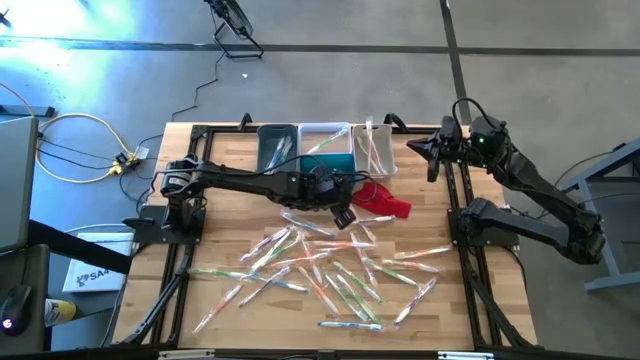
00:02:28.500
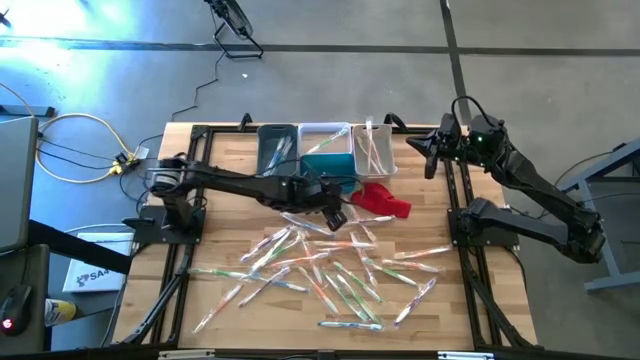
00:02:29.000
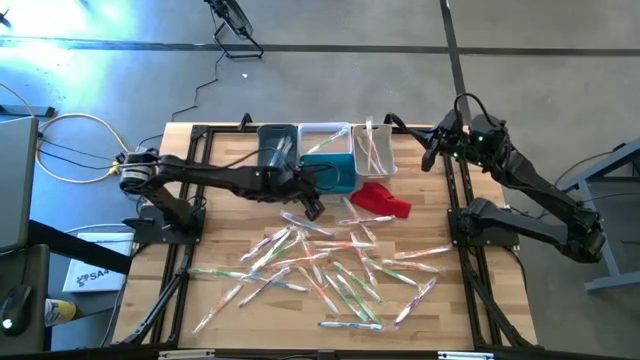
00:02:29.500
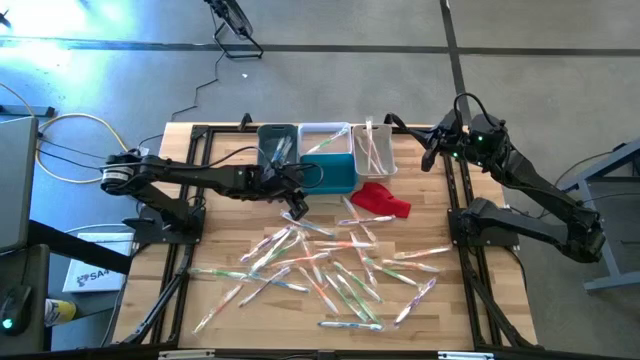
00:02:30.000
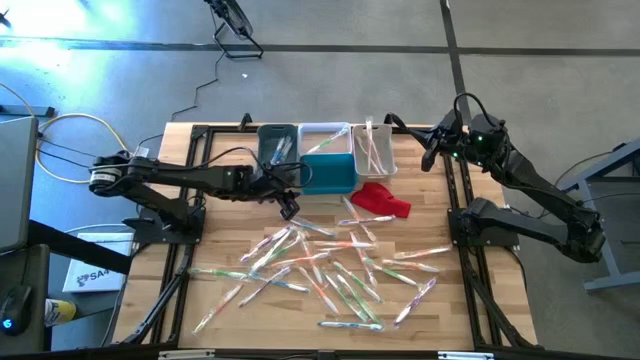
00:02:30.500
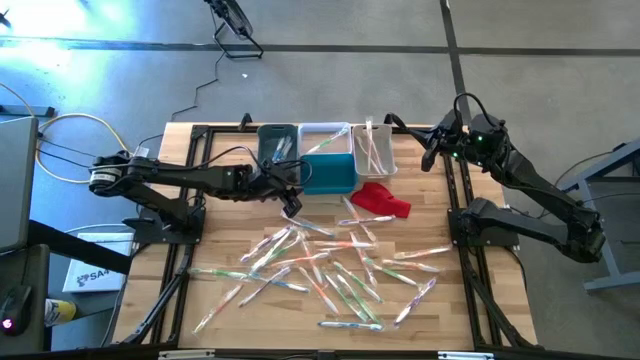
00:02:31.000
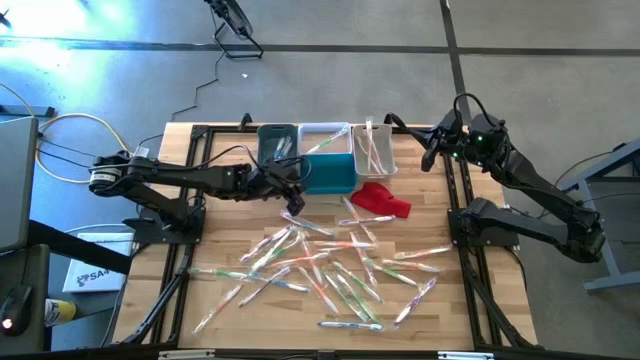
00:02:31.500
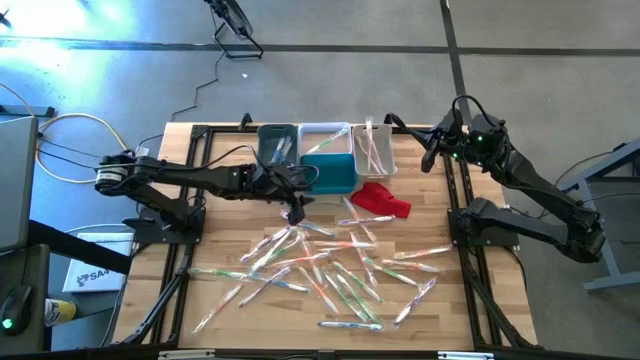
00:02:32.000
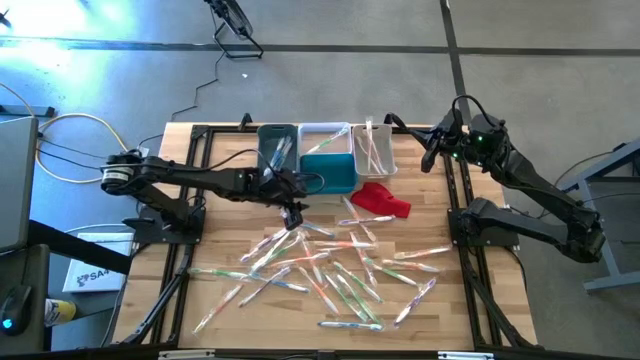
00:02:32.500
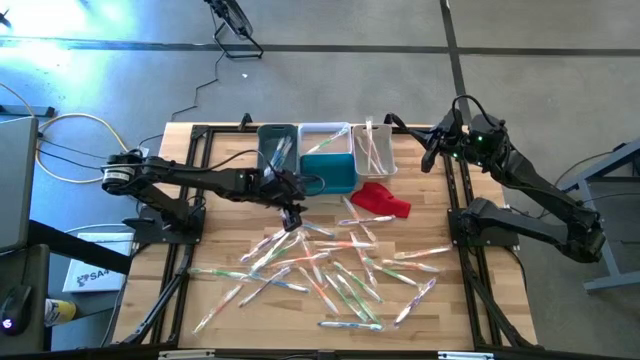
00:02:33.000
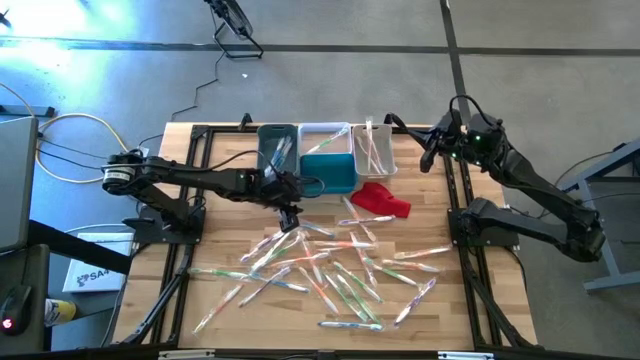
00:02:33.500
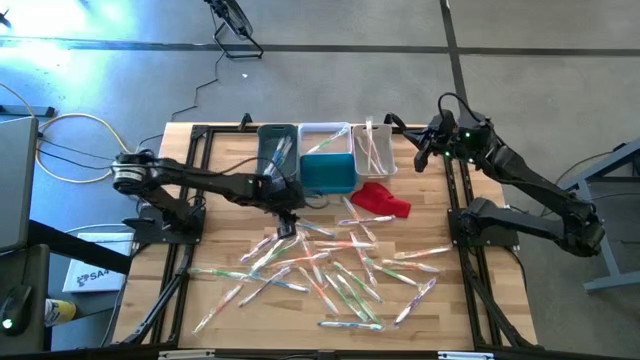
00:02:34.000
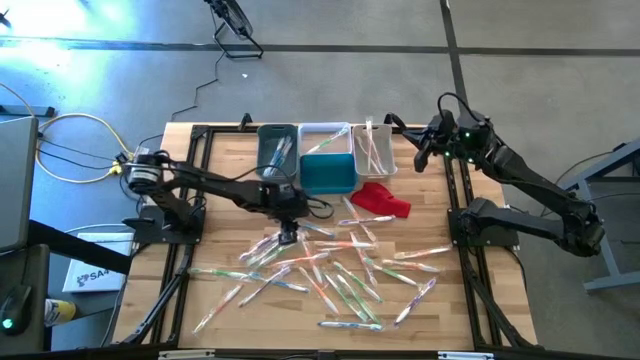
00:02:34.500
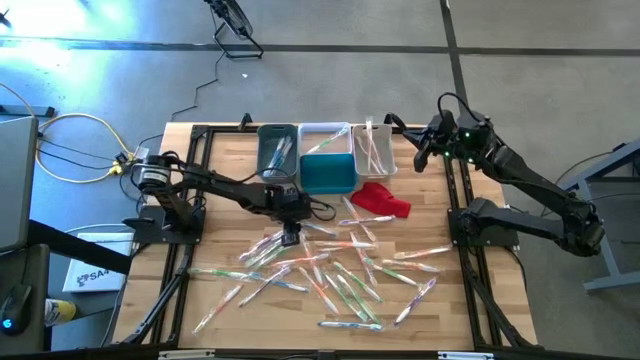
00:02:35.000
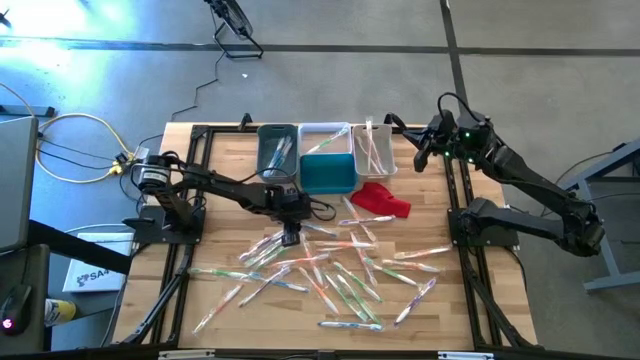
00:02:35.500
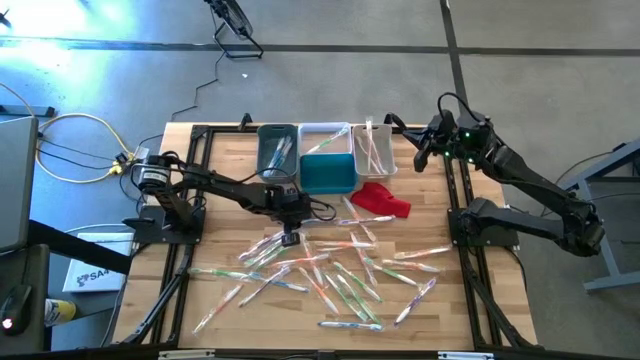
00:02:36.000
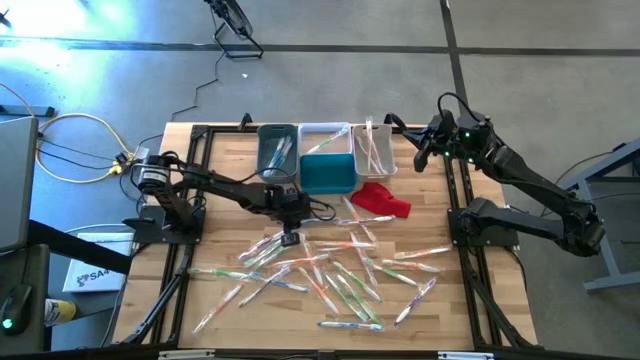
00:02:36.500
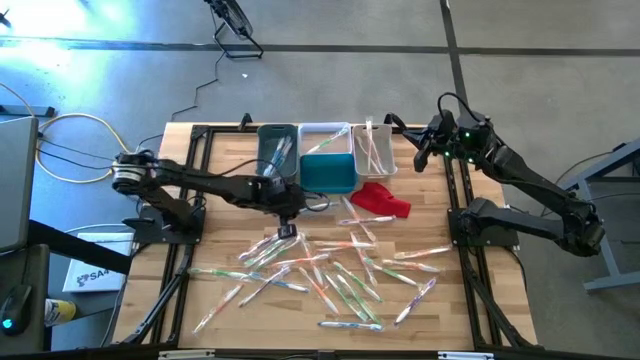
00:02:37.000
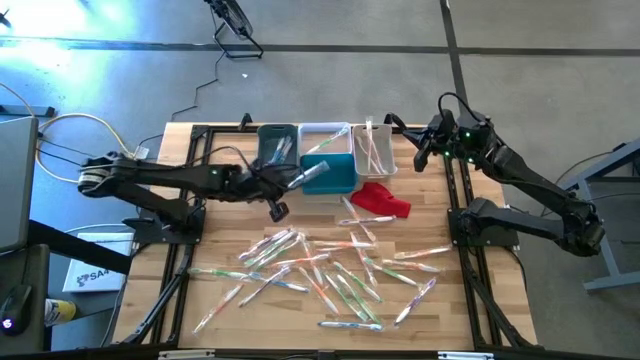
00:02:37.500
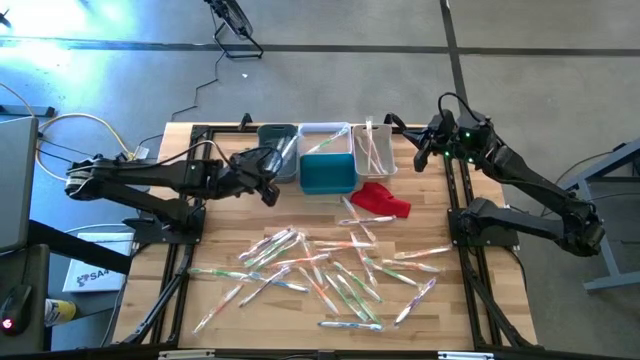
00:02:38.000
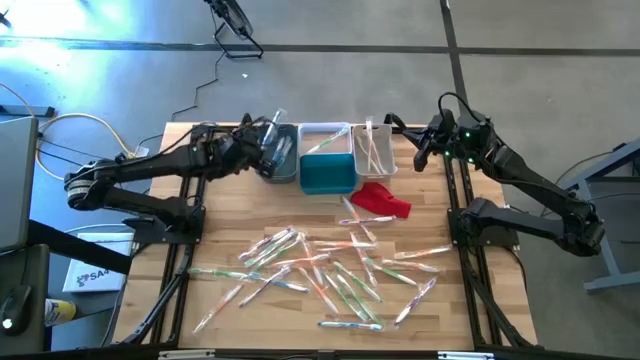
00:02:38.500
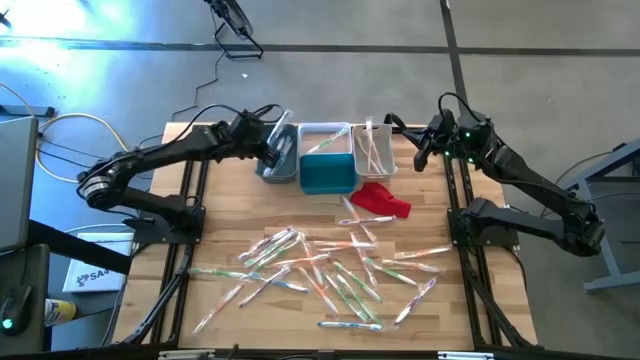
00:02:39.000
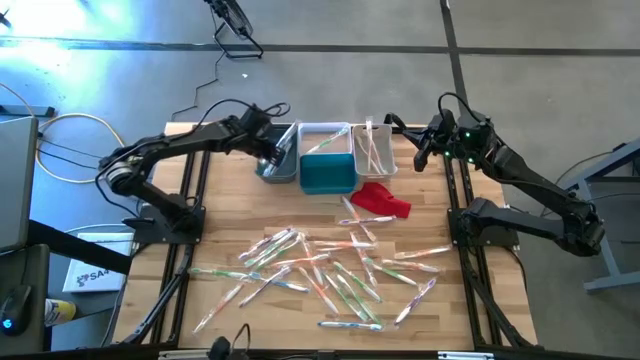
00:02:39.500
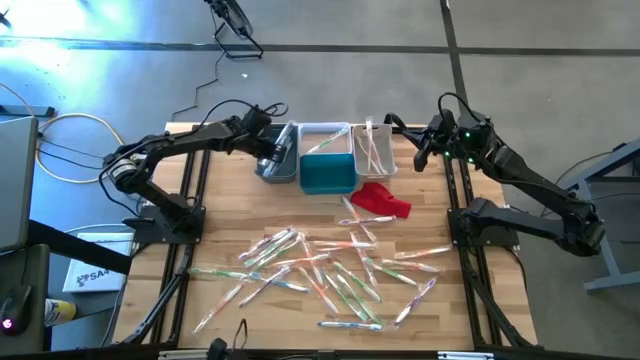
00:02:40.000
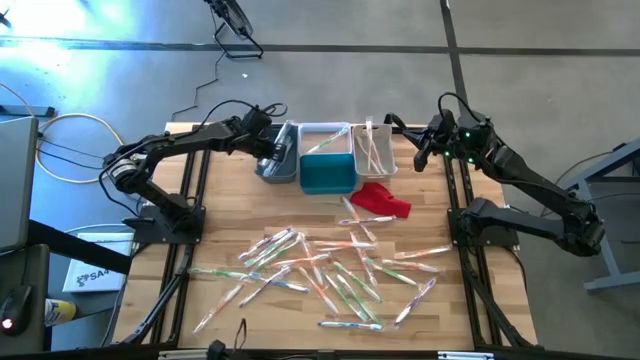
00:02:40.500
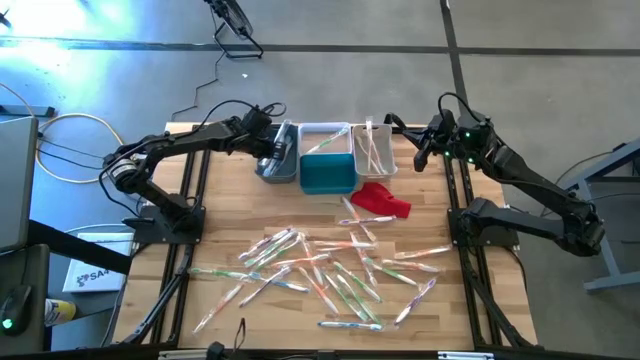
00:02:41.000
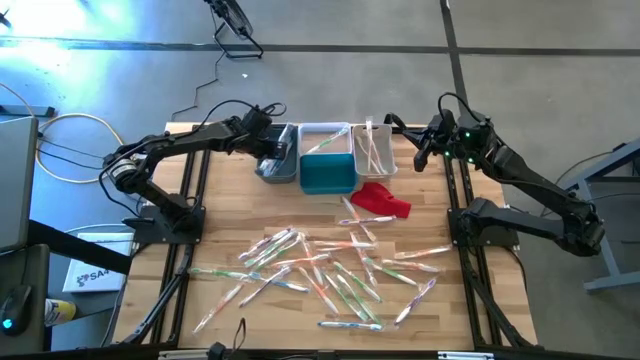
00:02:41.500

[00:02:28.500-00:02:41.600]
Task: Pick & Place Toothbrushes
Put the top blue toothbrush into the gray bin

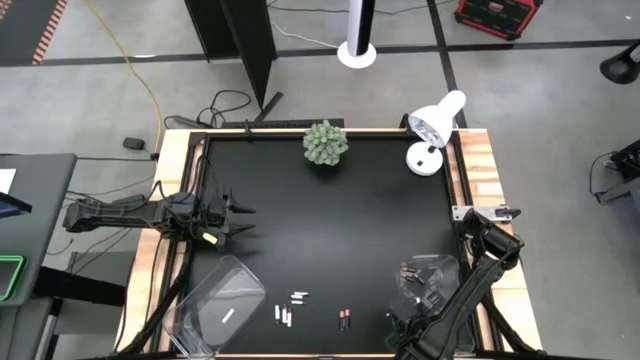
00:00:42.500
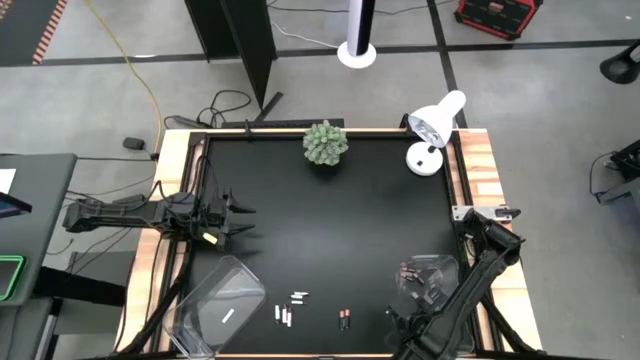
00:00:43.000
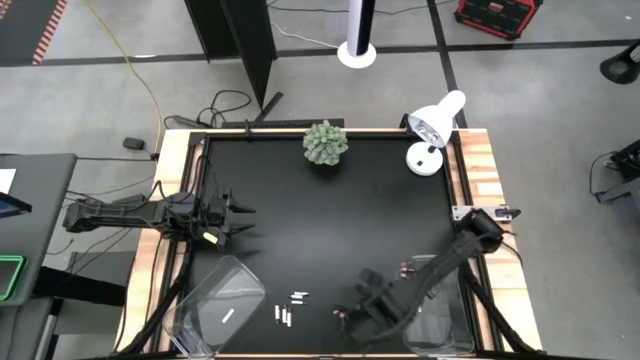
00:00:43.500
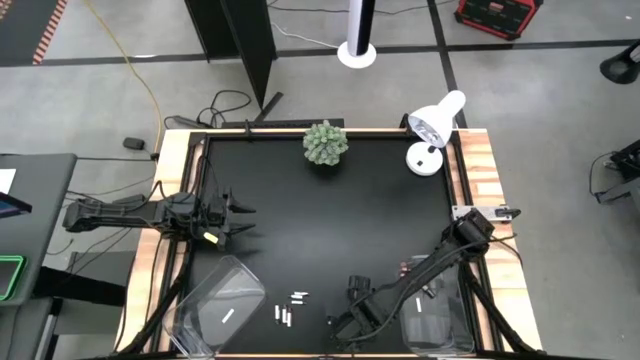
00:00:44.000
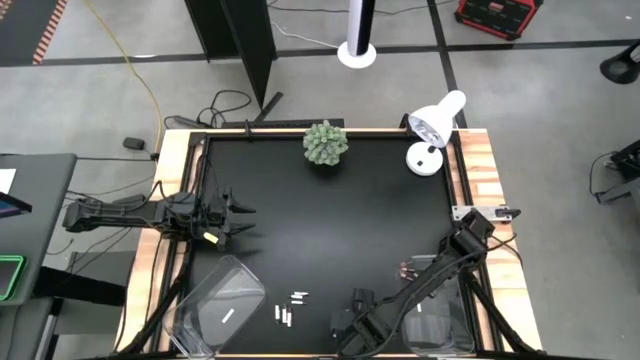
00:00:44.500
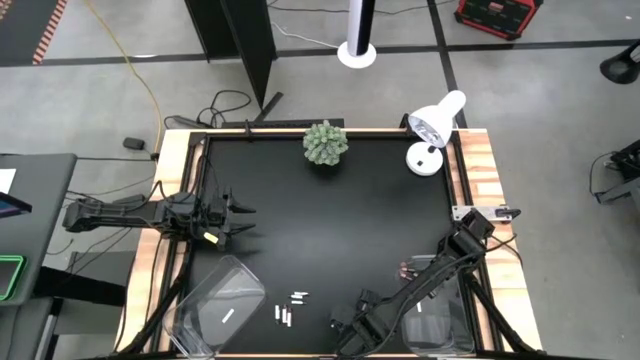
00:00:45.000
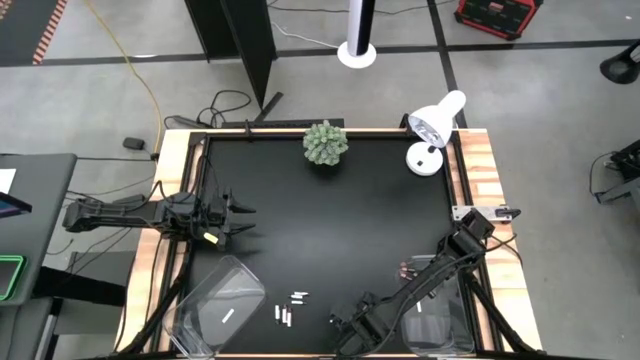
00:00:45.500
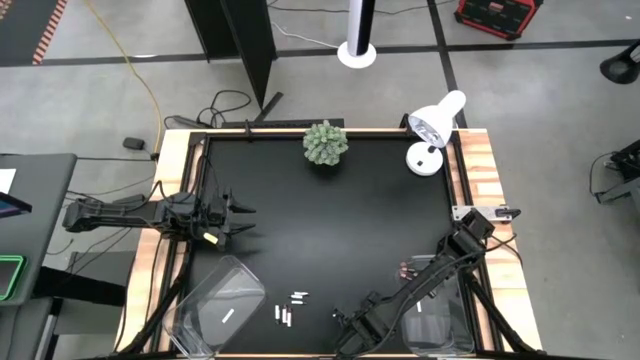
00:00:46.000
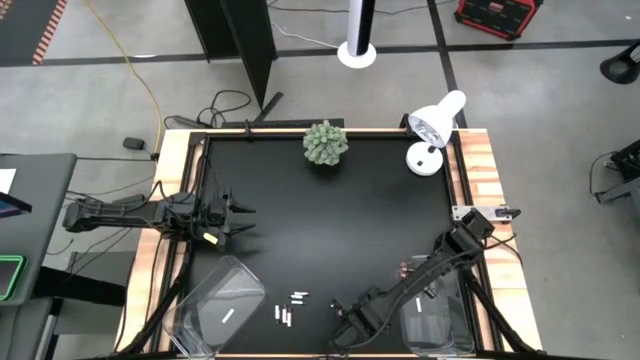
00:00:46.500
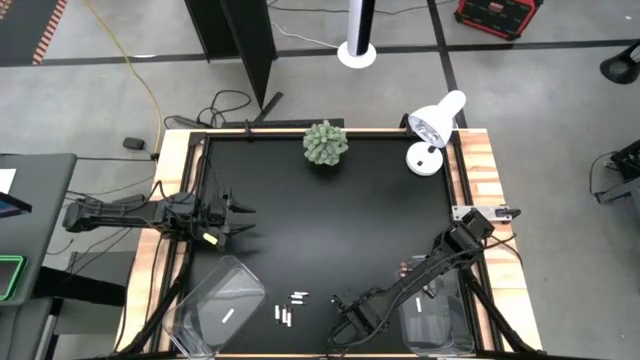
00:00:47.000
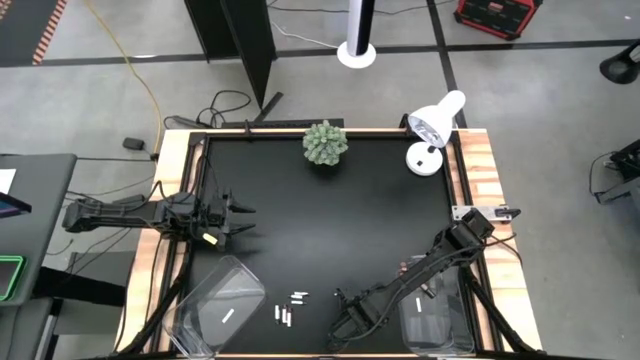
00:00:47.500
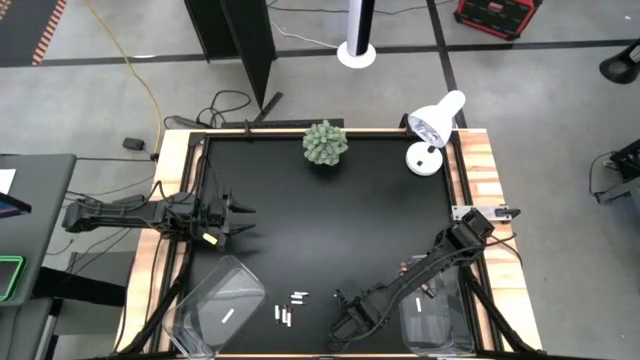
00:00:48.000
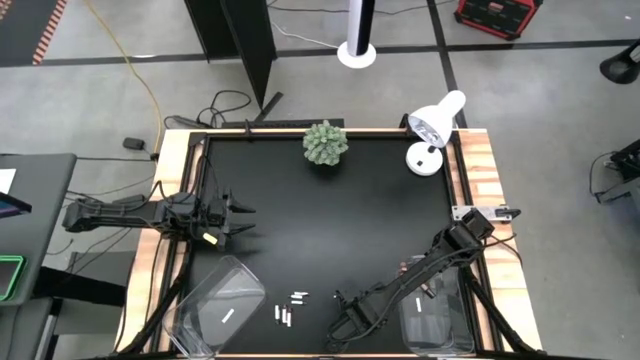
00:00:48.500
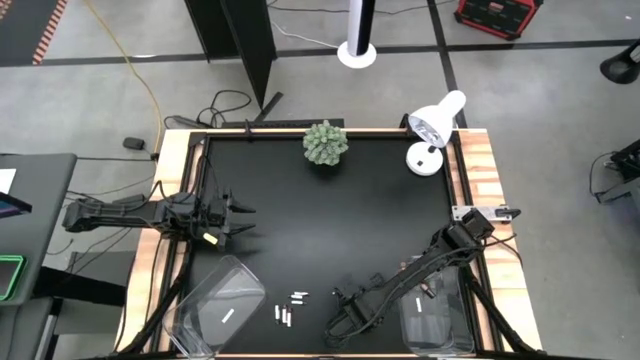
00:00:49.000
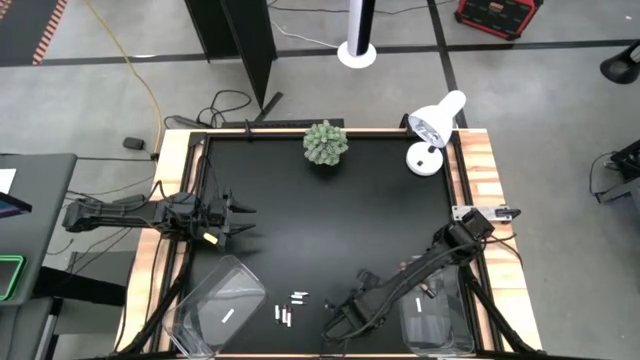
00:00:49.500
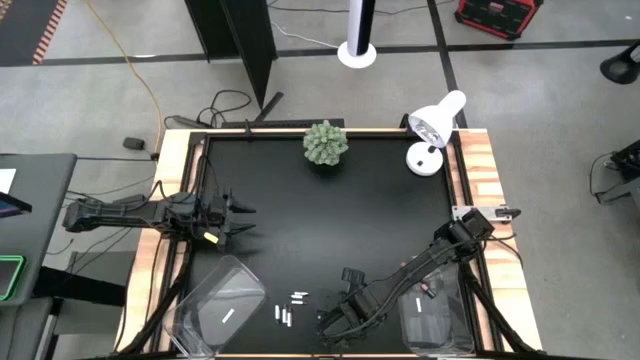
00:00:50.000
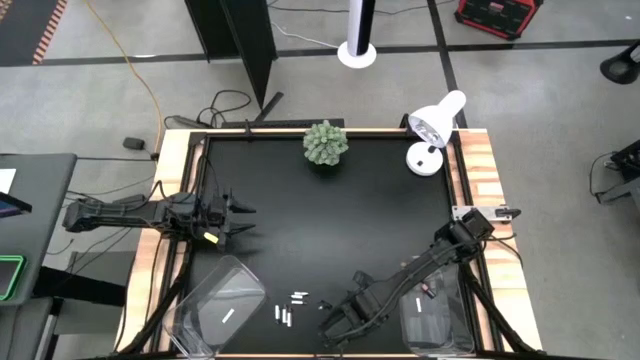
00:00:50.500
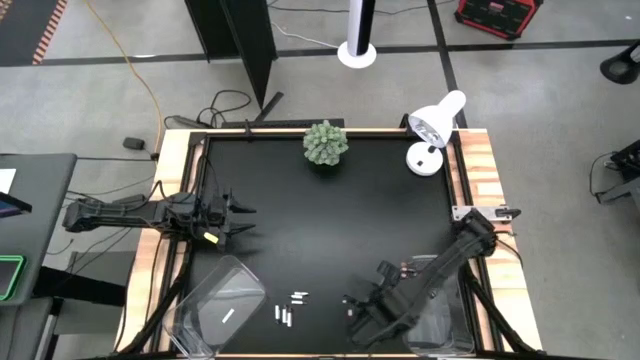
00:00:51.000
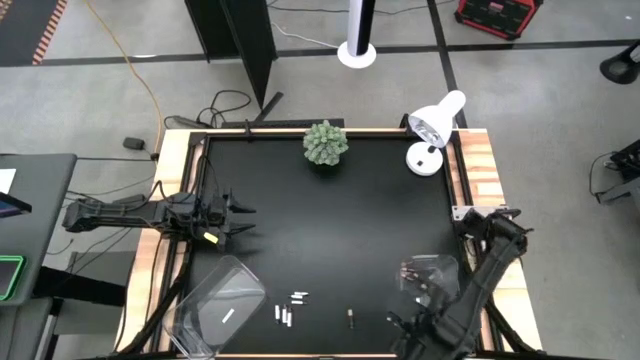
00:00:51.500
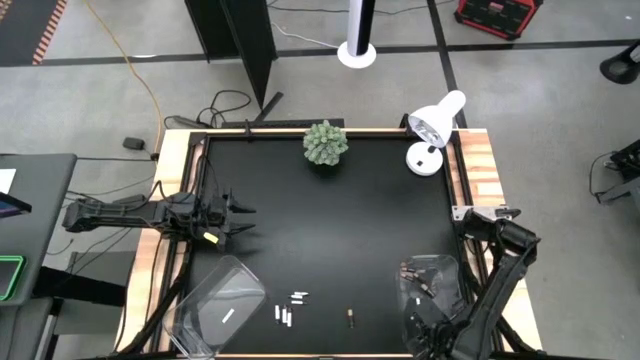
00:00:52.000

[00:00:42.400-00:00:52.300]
Task: Sort batteries
Put the black battery into the right transparent bin
